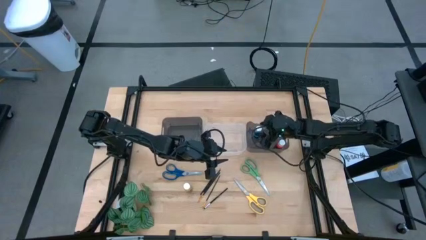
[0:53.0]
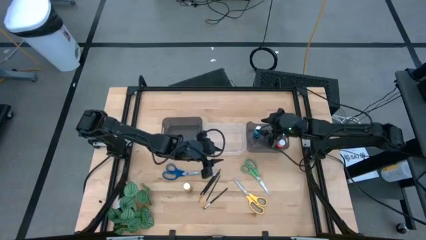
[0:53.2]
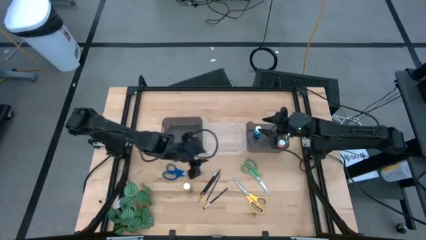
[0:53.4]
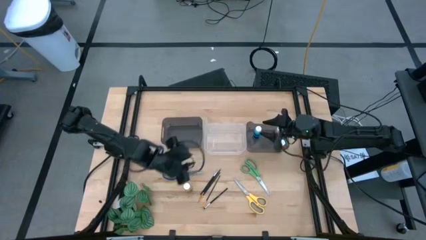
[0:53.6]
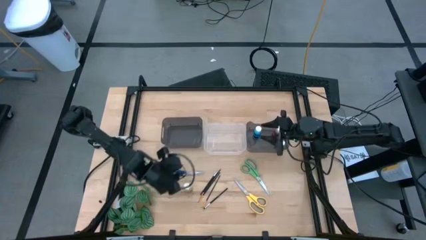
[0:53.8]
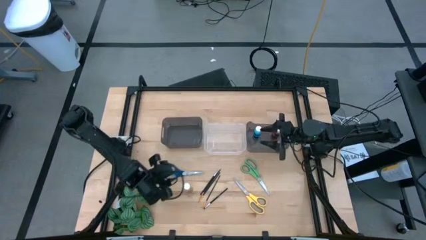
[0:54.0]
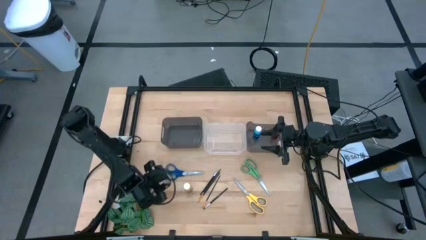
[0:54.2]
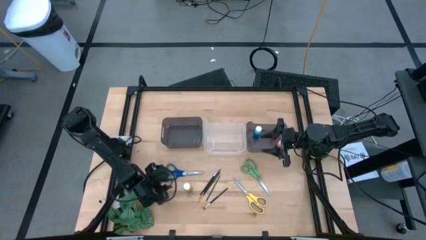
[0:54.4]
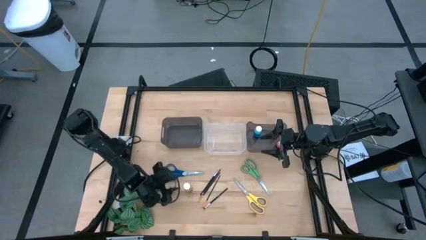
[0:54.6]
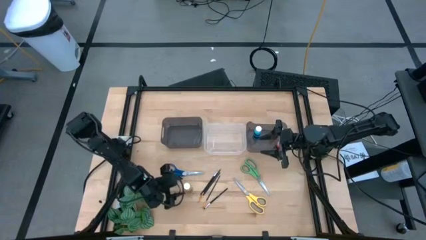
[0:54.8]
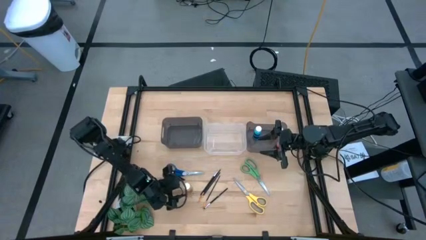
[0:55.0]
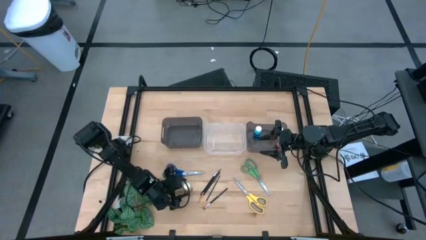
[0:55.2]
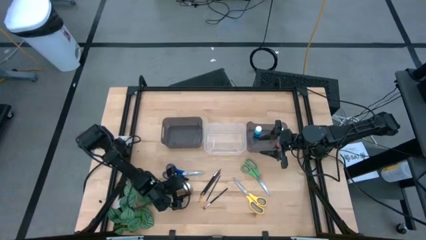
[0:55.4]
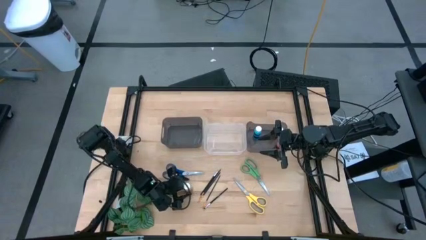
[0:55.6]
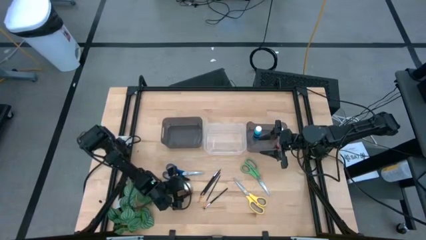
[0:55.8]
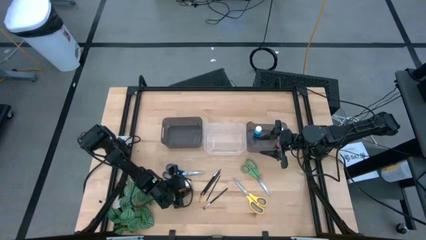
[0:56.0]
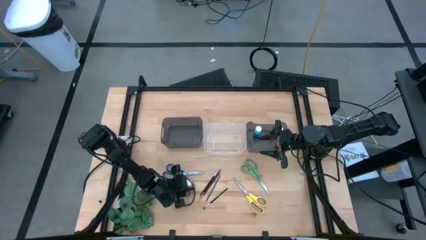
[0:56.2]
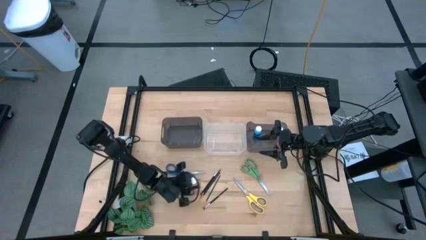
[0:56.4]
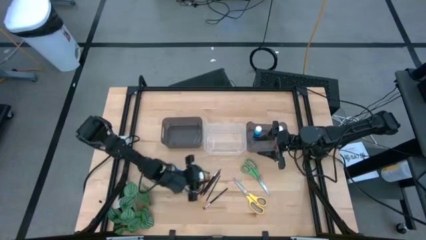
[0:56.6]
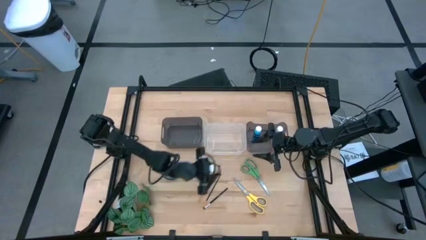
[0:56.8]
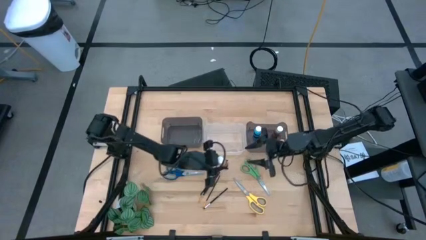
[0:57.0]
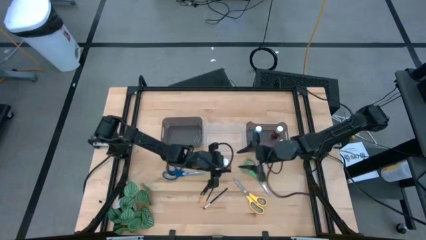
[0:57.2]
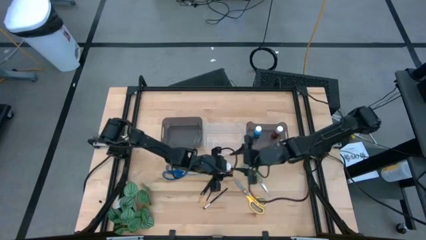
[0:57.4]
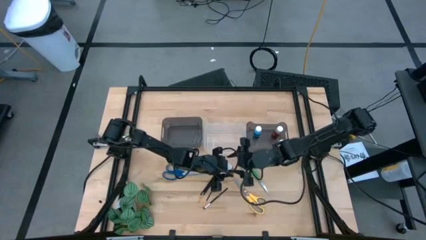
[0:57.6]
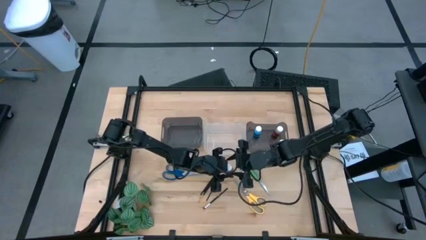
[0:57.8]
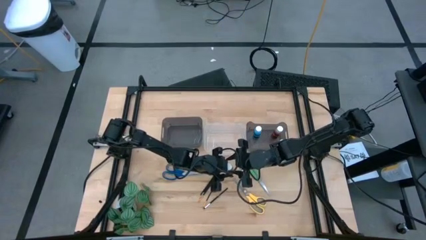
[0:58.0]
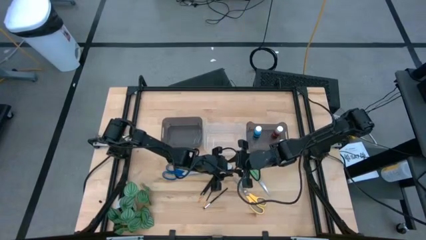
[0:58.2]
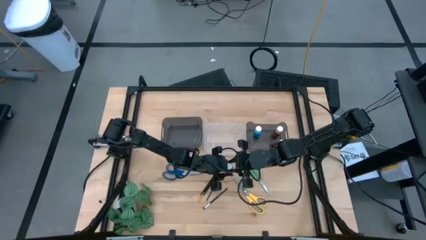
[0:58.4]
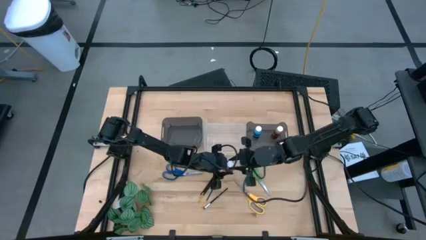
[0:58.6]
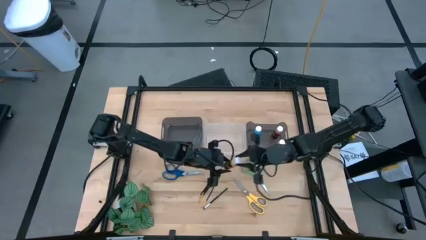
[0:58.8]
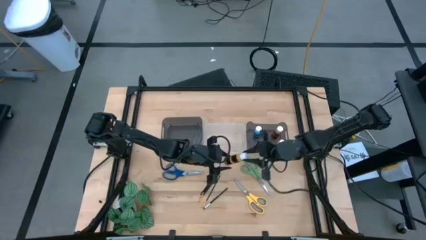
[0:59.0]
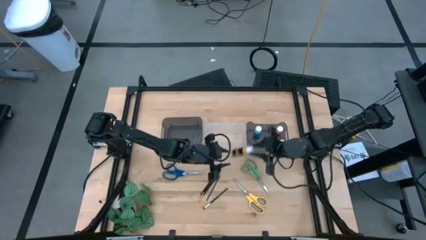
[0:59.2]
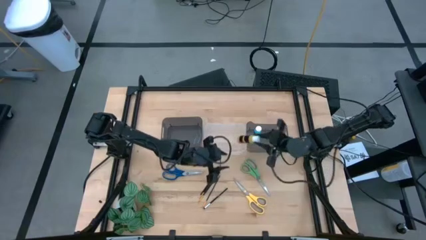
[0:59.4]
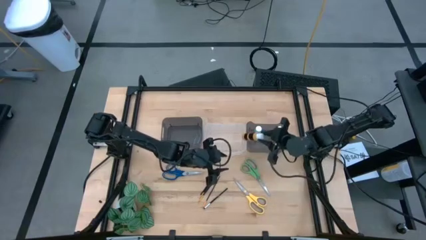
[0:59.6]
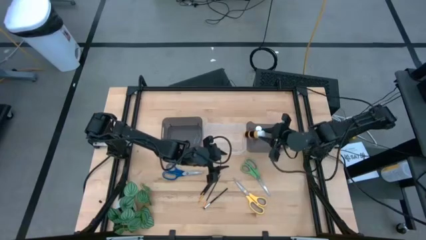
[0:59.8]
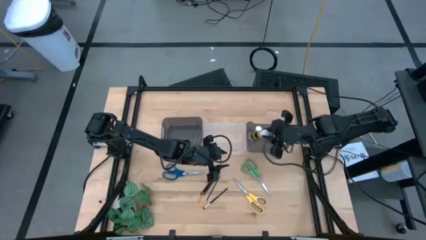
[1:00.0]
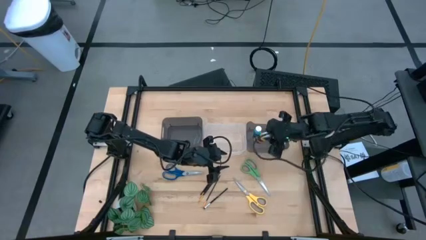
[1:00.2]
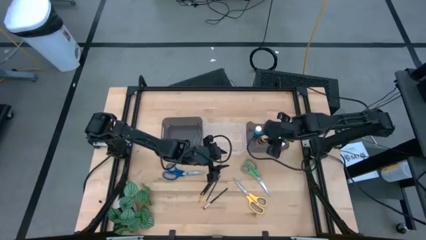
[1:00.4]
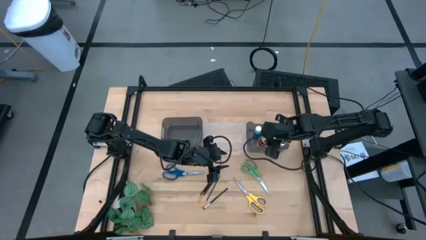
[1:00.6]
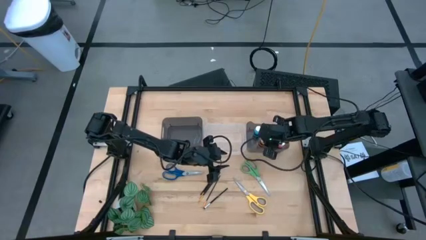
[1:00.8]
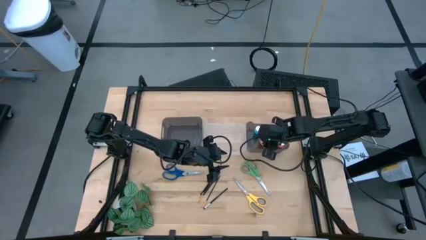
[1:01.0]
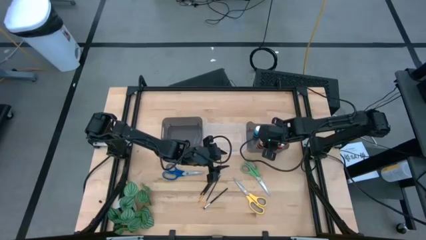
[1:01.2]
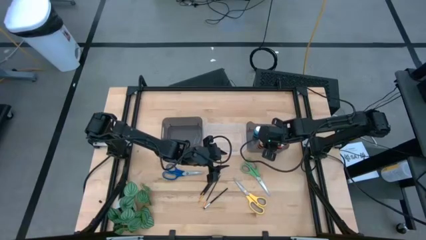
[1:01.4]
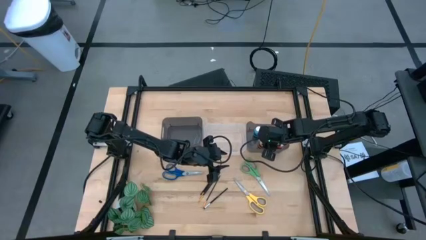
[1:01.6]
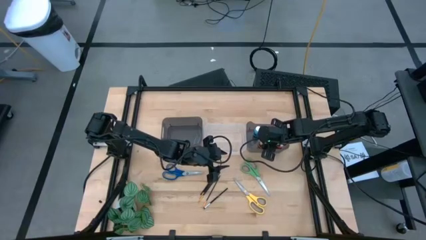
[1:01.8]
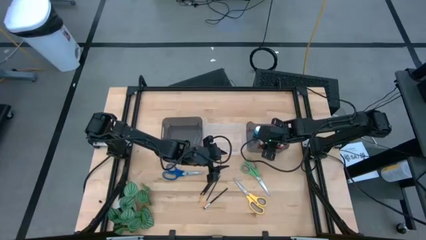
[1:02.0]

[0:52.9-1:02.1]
Task: Pick & Place Paint Supplies
Put the yellow paint bottle into the right black bin

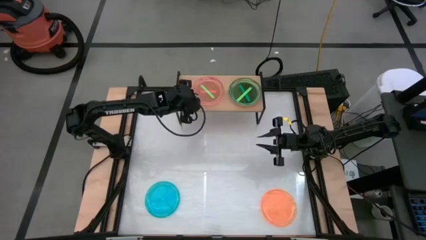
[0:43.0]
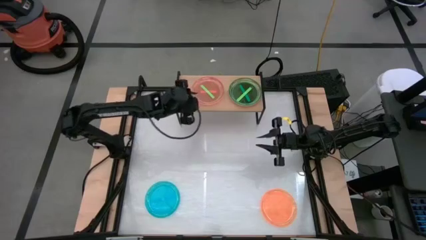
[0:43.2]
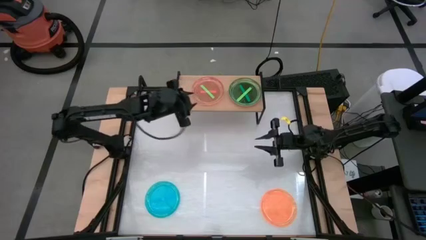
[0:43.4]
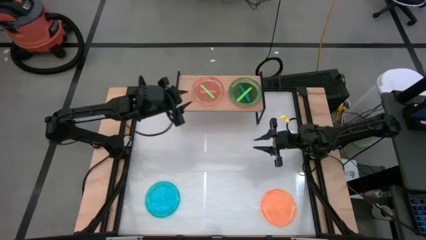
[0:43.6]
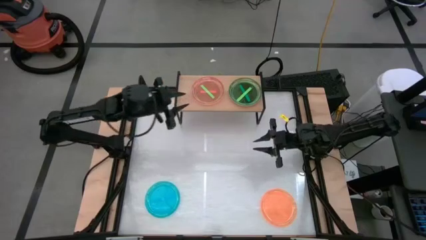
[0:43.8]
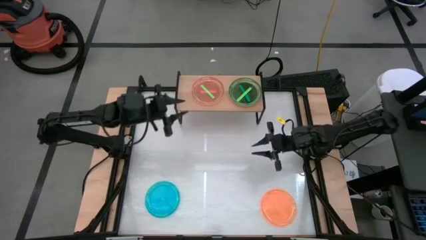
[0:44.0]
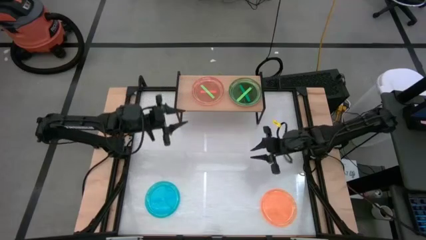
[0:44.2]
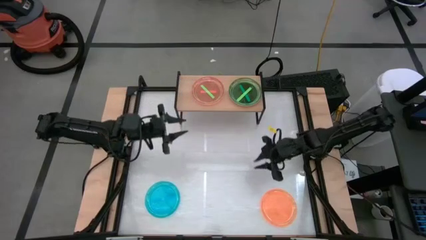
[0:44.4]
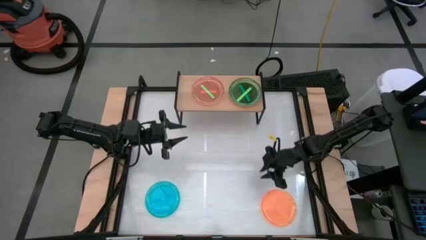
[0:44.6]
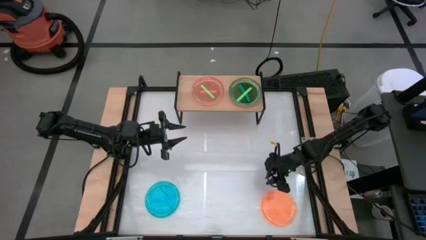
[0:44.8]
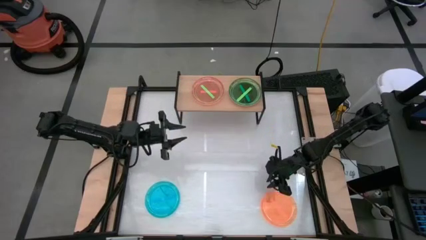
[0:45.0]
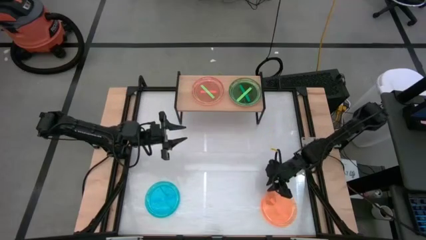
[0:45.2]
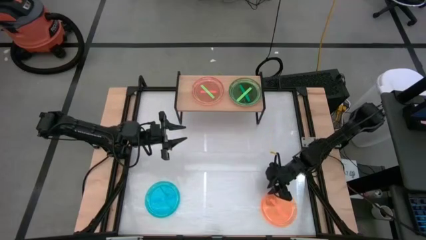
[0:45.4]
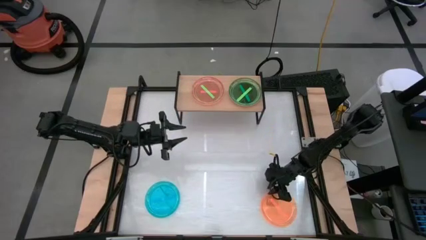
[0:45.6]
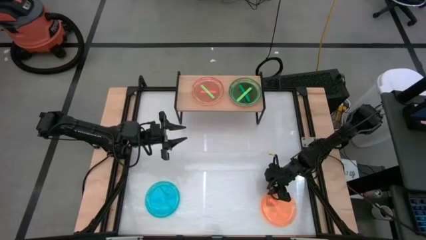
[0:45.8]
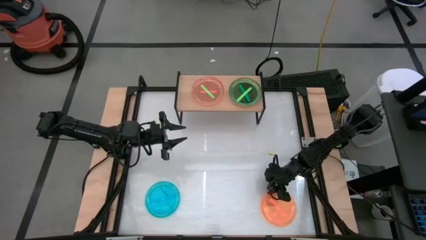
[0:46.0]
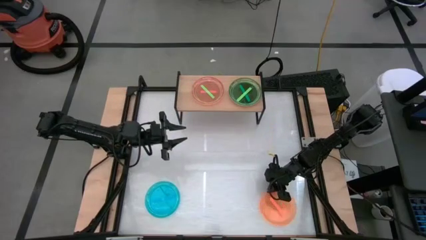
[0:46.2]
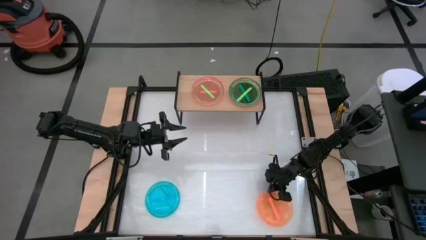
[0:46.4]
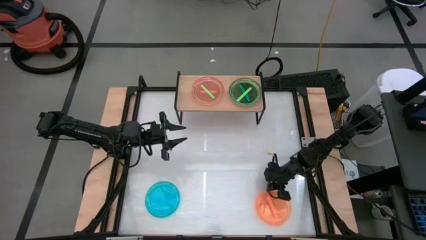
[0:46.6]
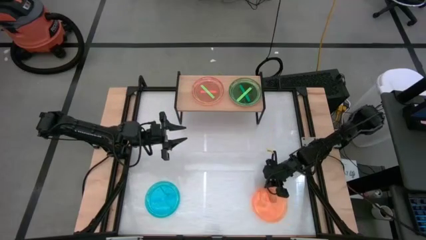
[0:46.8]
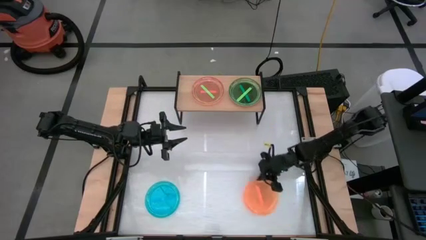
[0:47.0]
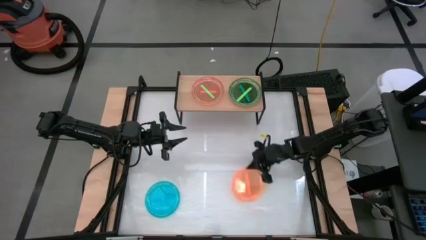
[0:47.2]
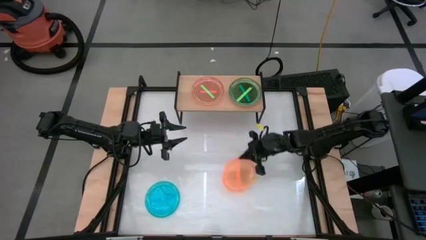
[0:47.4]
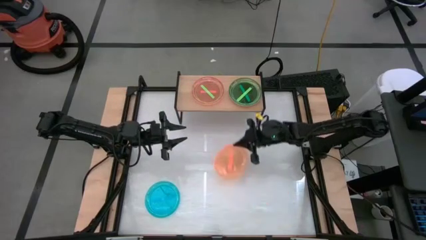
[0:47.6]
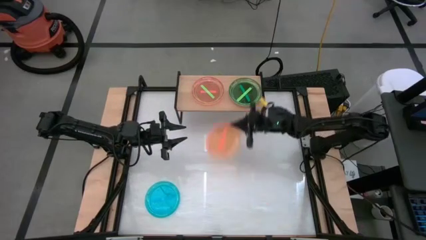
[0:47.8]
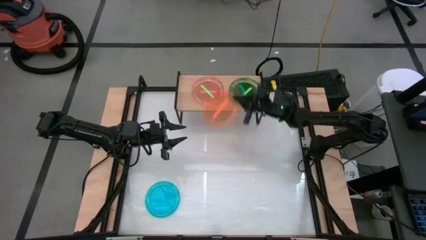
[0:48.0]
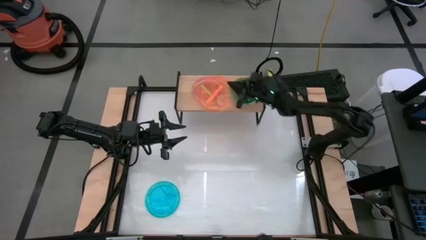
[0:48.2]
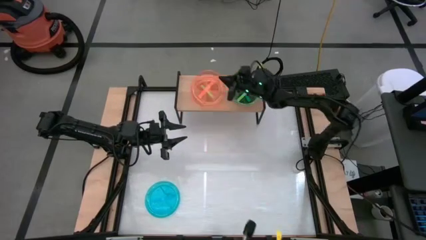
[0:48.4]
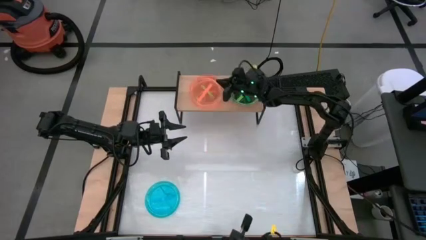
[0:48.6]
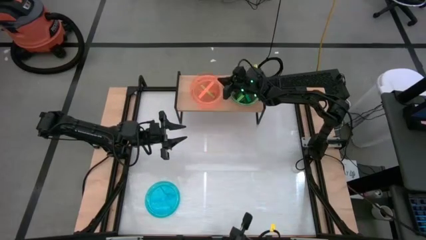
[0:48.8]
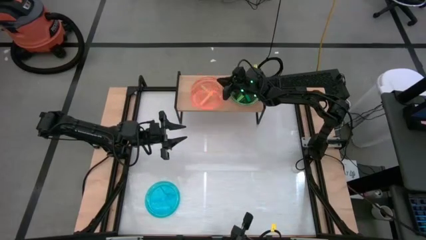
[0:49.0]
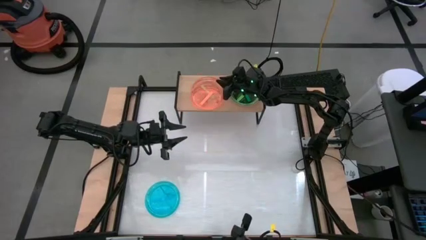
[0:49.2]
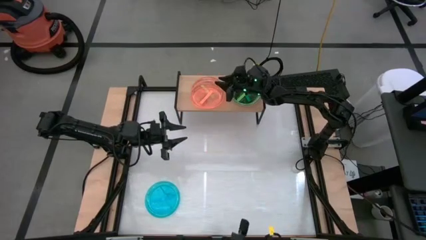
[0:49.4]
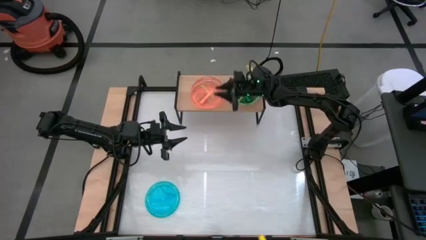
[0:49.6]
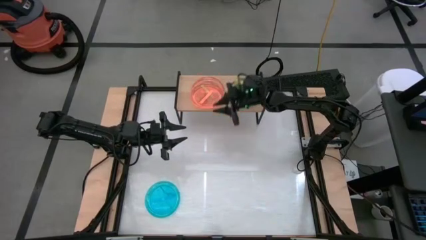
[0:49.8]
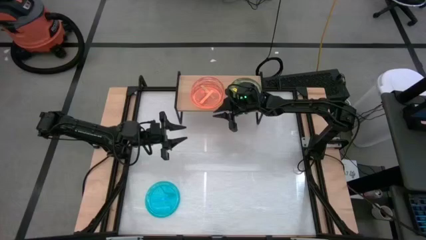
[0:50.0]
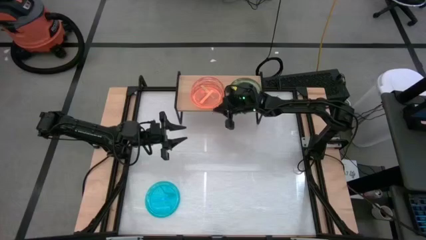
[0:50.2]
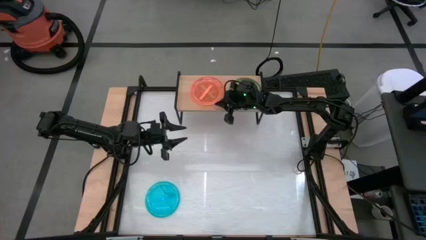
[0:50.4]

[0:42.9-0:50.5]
Task: Place and stack plates onto a shelf
Stack the orange plate on top of the green plate on the shelf
